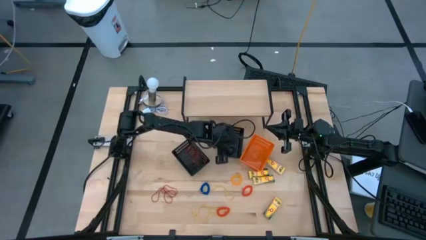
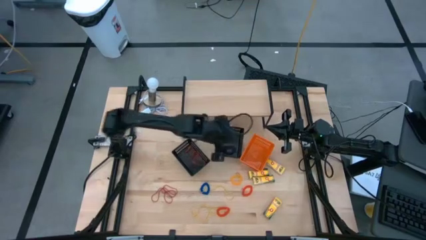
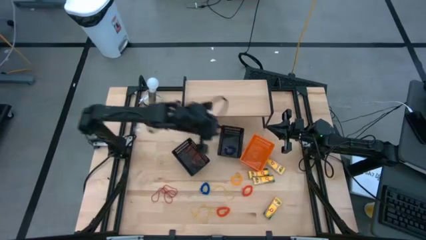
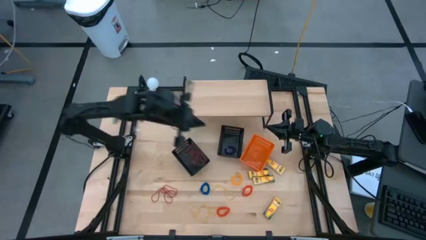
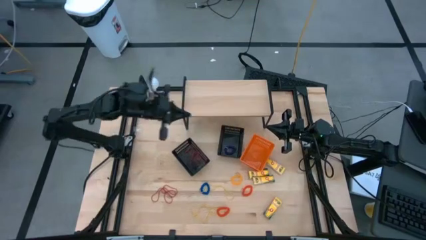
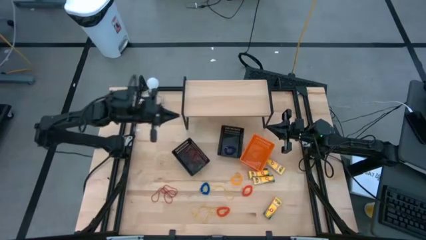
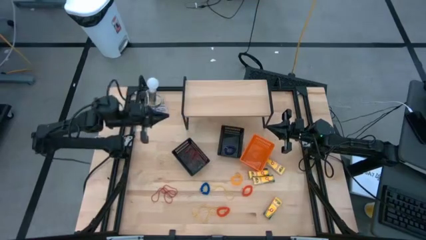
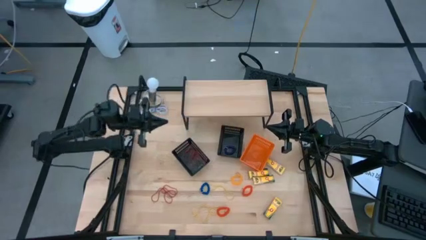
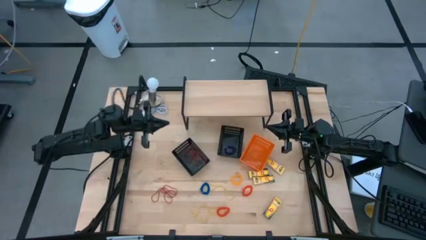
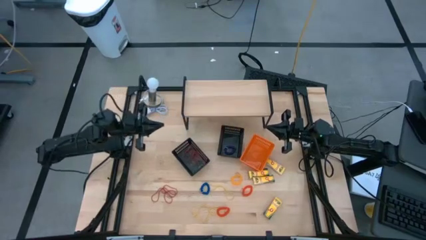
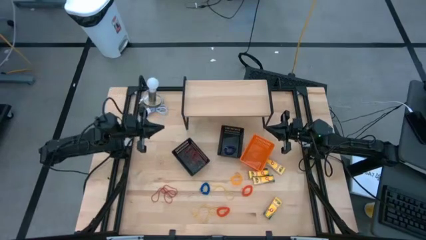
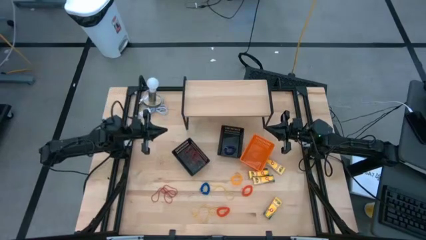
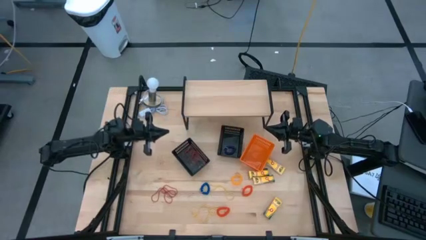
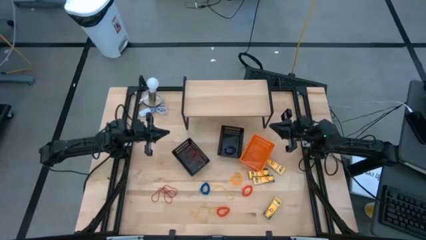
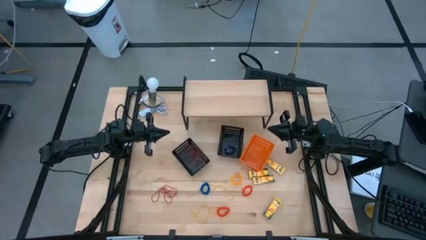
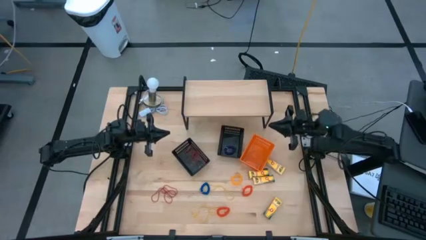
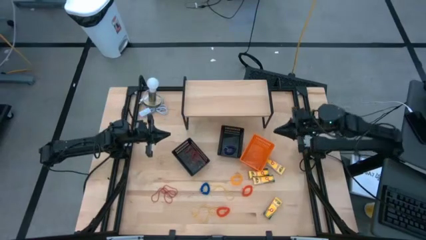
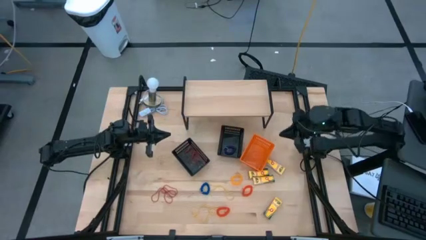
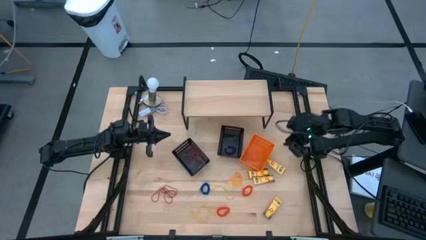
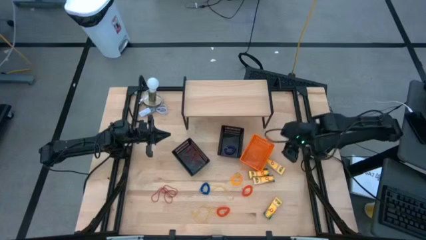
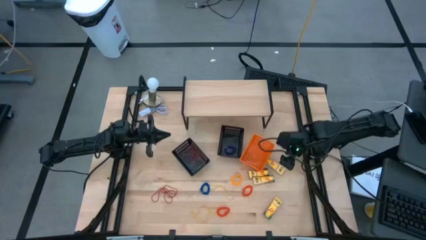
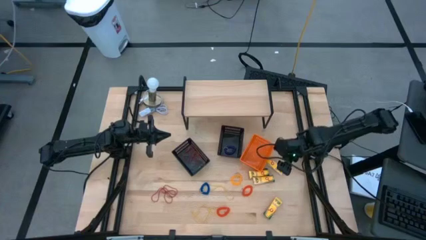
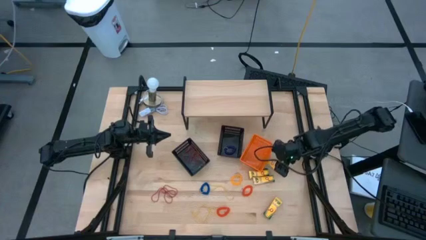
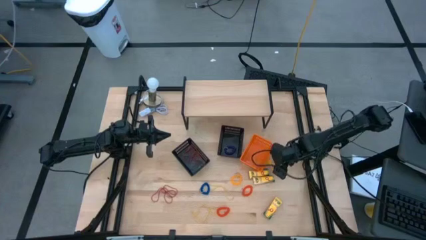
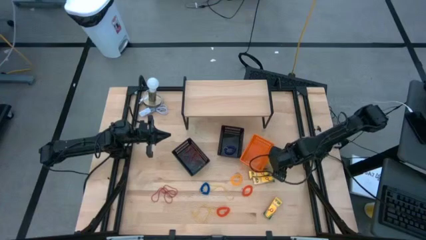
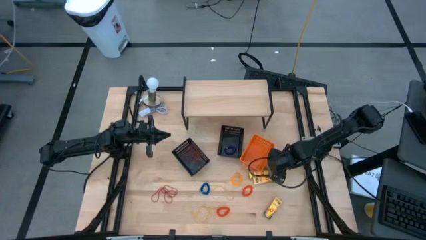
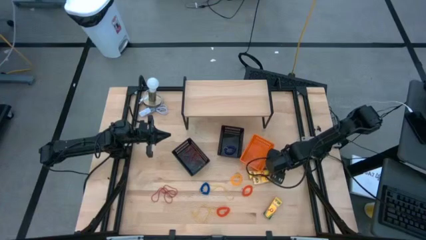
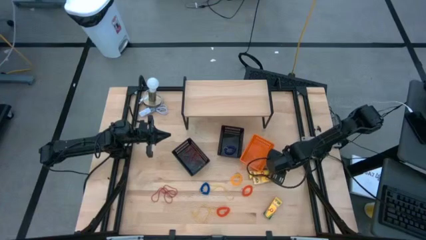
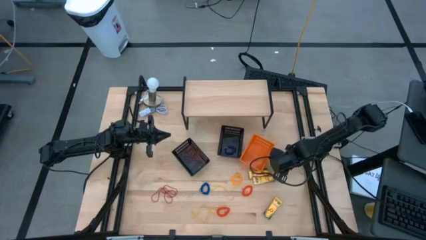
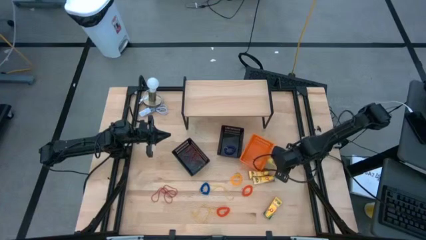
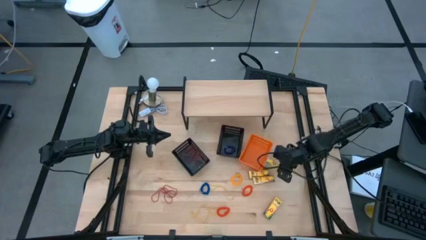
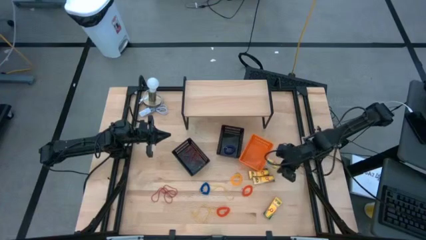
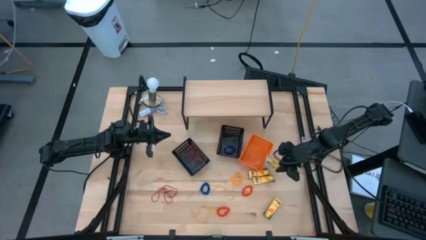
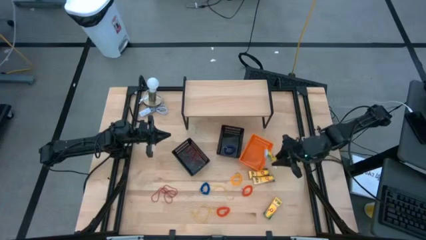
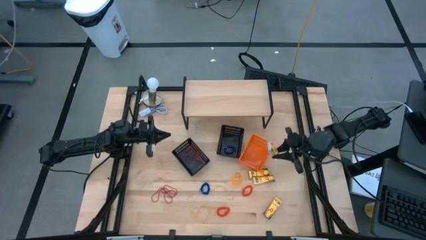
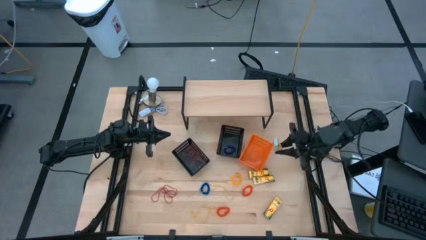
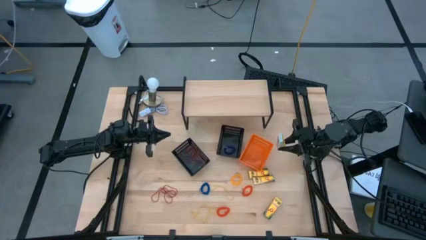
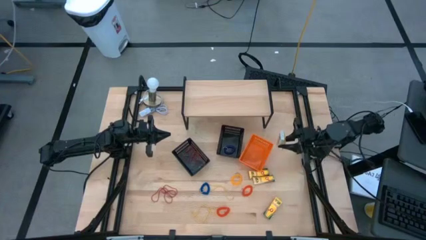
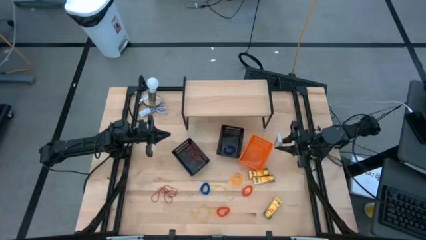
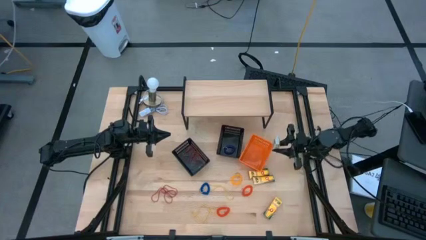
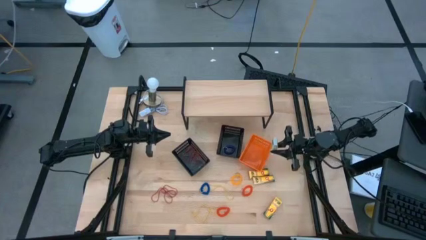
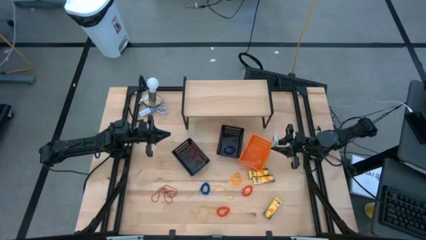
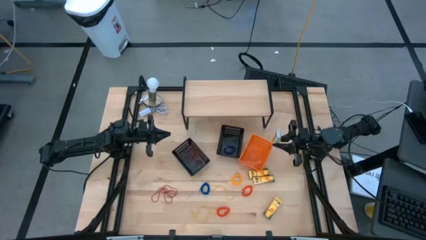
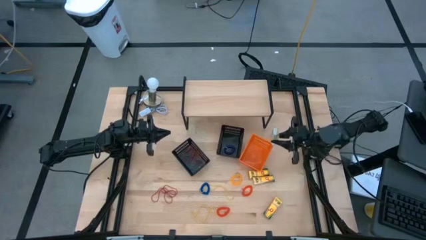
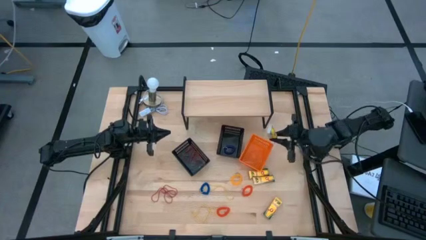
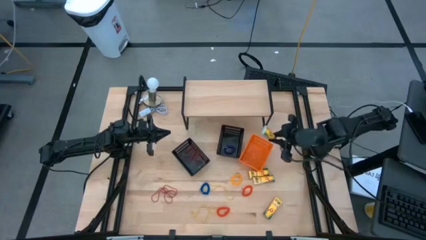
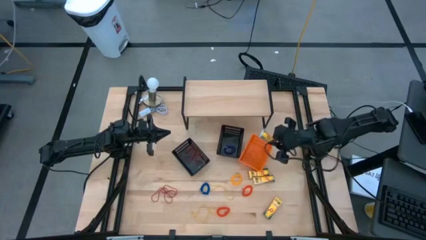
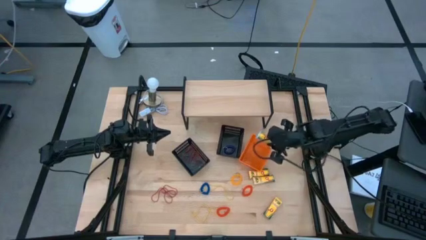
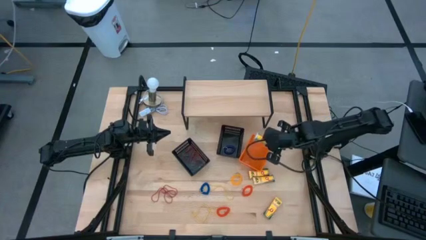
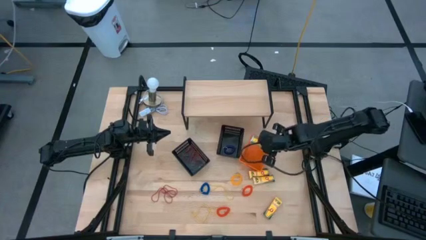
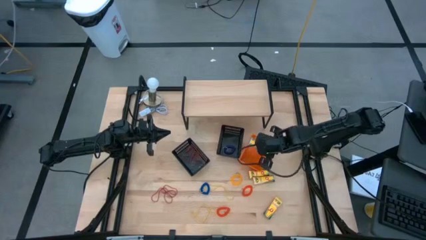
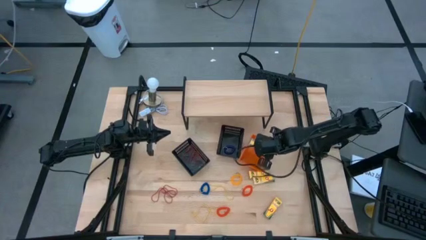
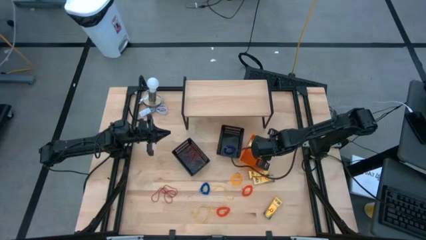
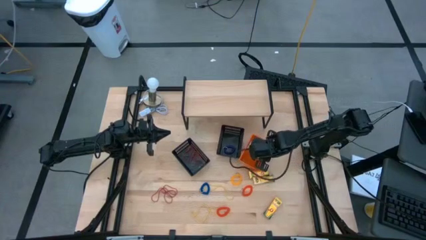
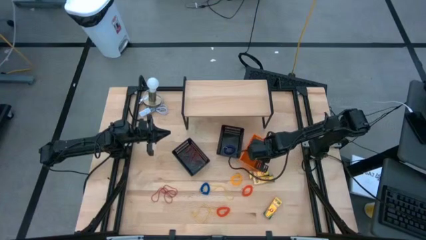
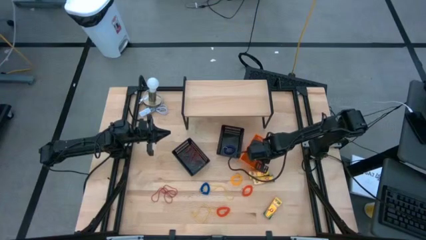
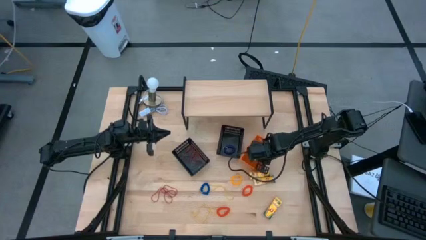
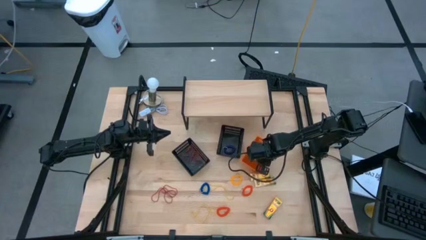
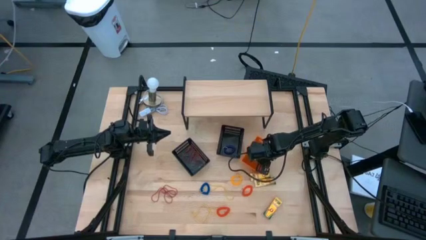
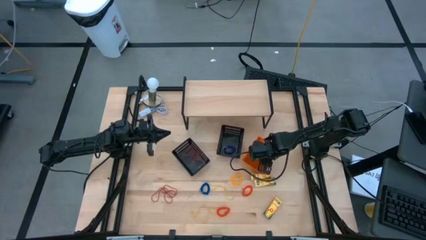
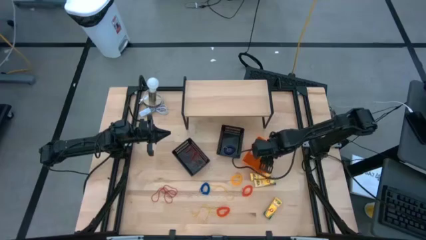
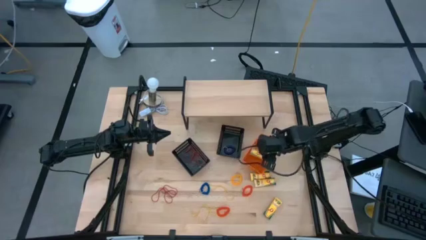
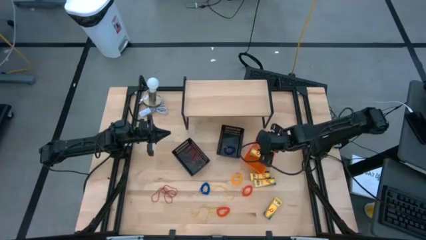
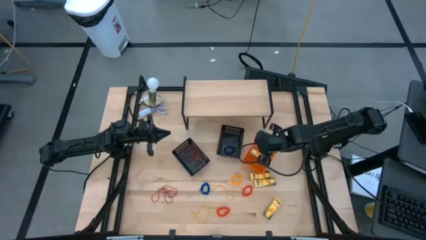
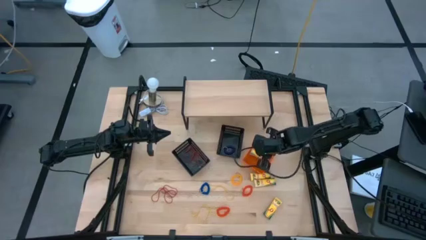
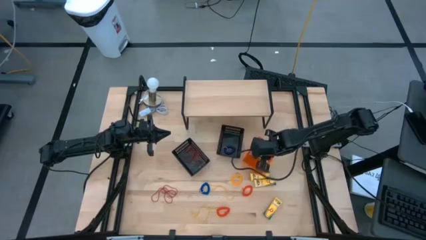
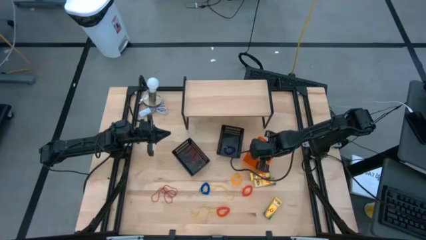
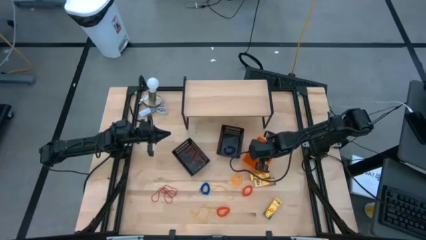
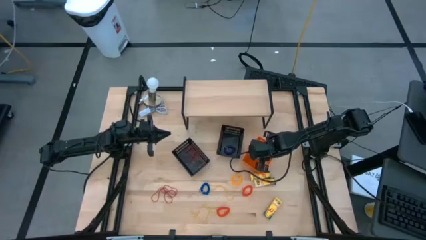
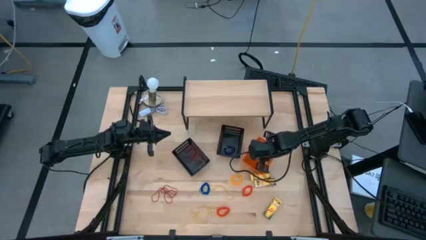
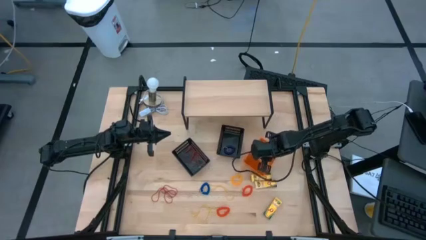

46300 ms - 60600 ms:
Task: Pick & Place Office Desk Supplies
Put the crayon box into the orange bin
